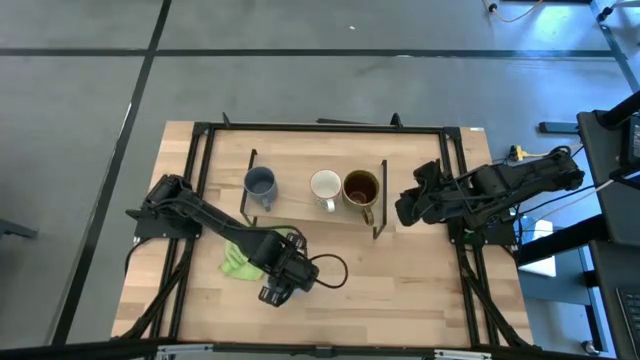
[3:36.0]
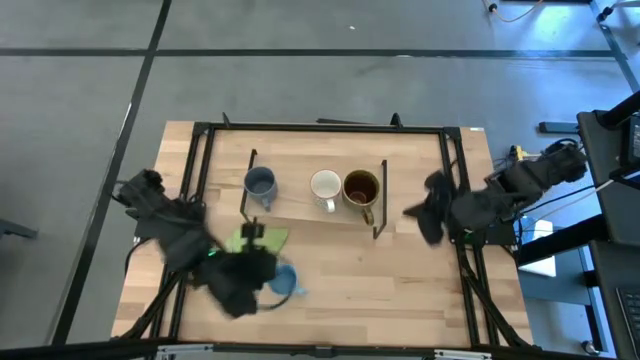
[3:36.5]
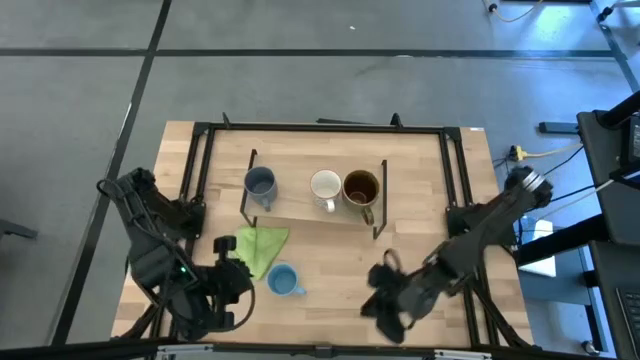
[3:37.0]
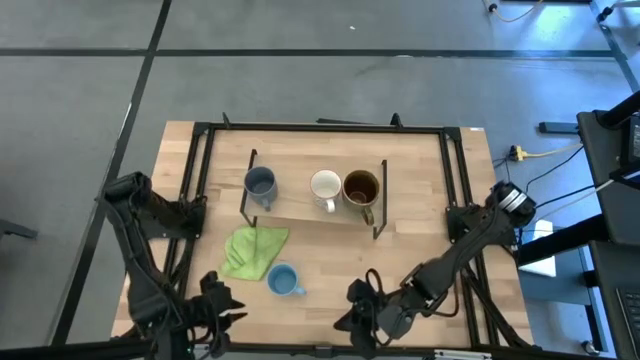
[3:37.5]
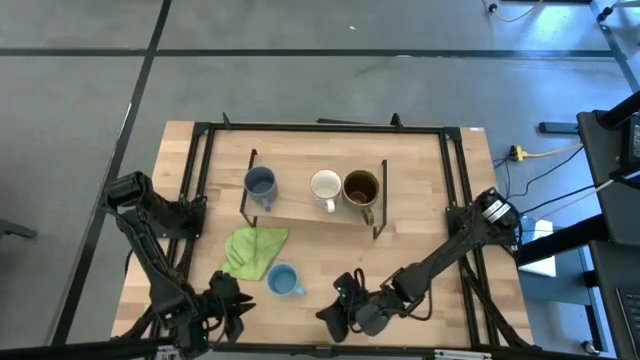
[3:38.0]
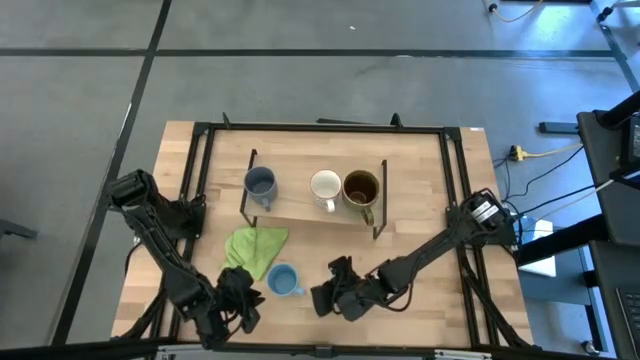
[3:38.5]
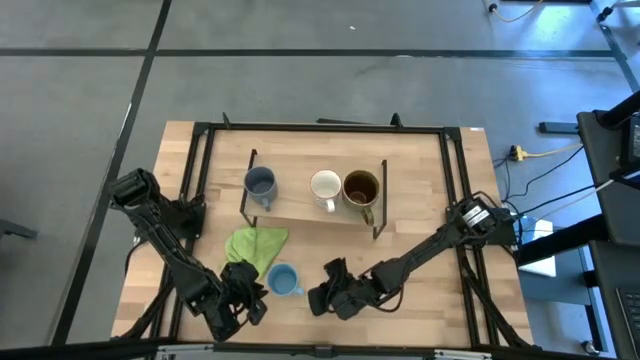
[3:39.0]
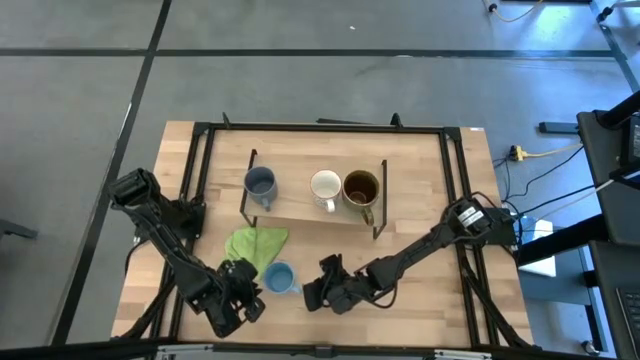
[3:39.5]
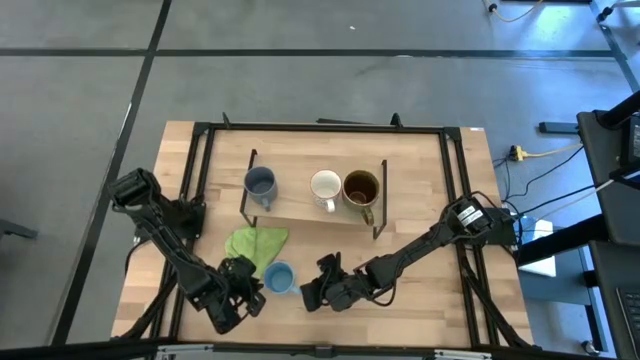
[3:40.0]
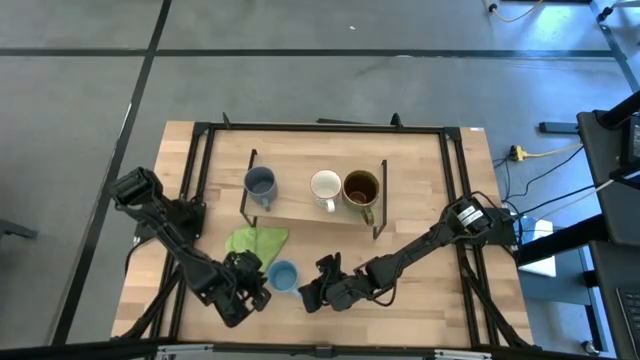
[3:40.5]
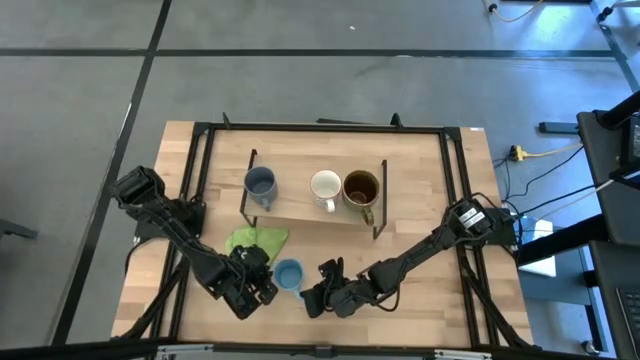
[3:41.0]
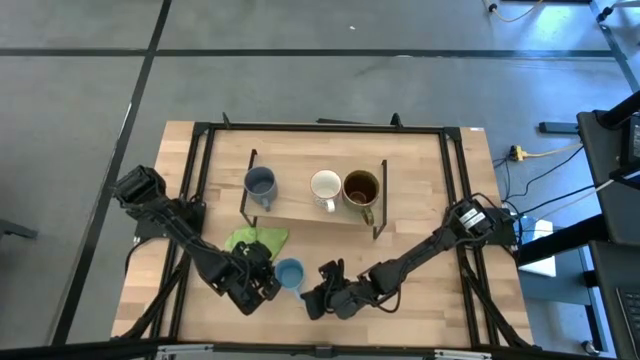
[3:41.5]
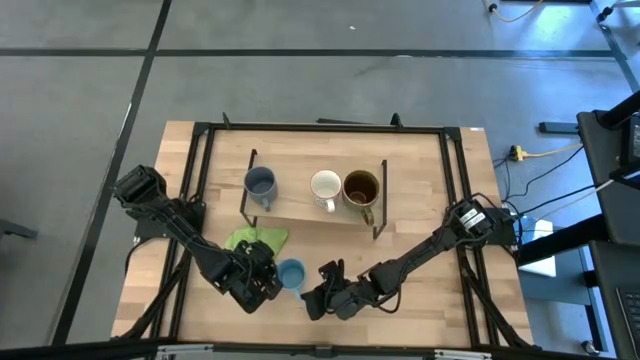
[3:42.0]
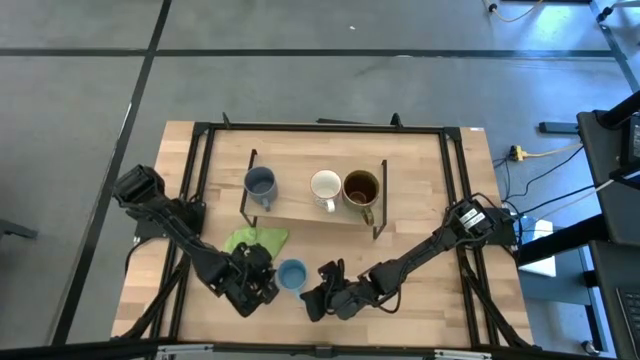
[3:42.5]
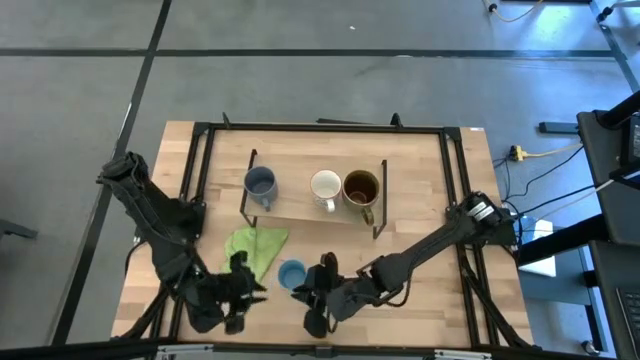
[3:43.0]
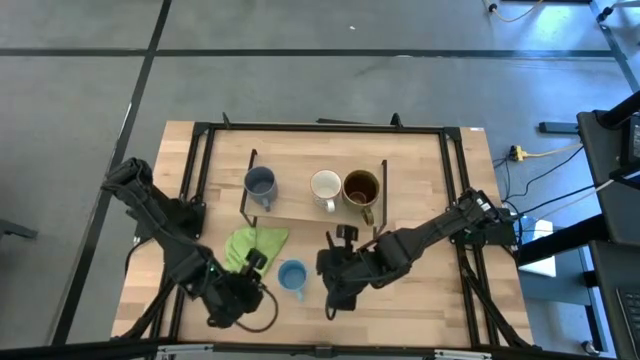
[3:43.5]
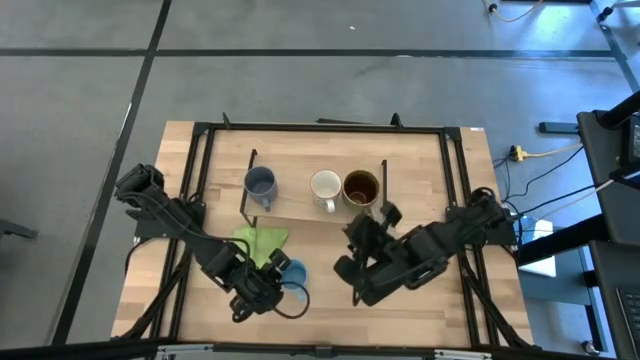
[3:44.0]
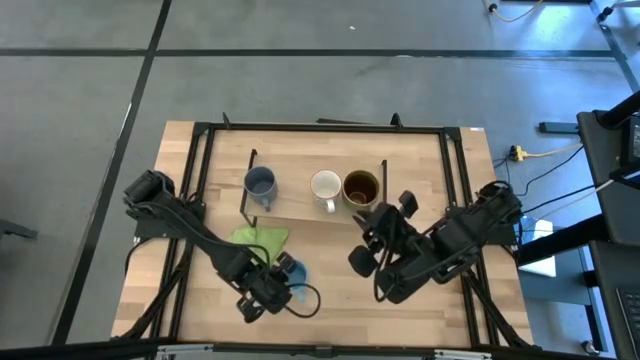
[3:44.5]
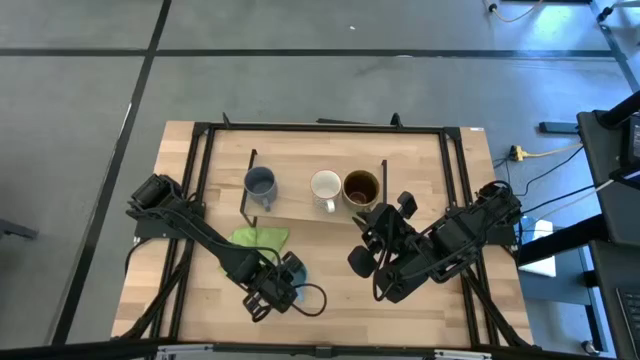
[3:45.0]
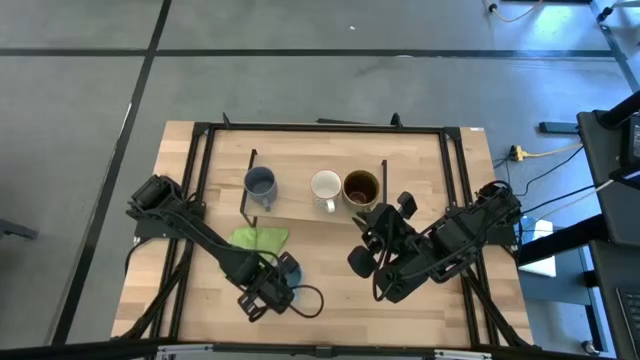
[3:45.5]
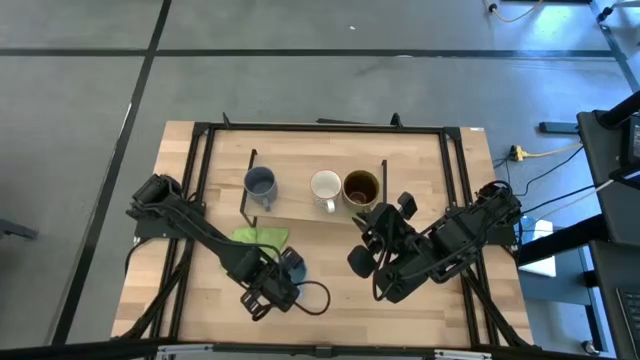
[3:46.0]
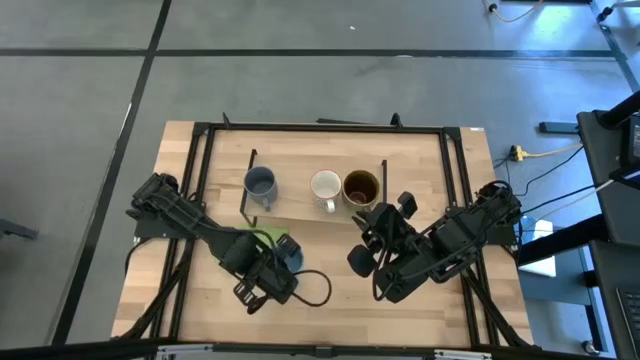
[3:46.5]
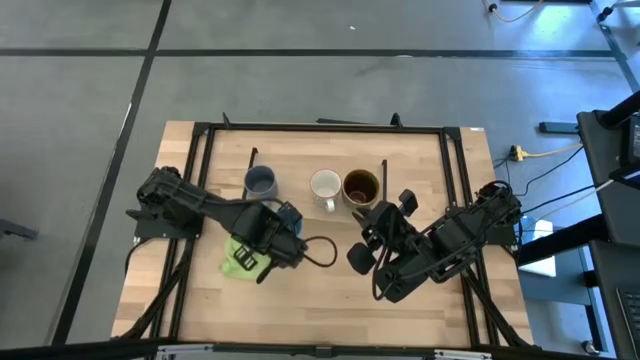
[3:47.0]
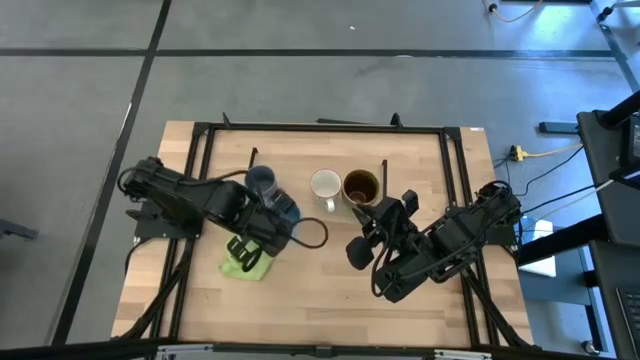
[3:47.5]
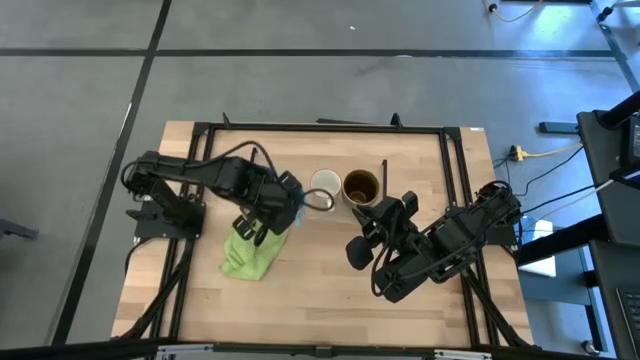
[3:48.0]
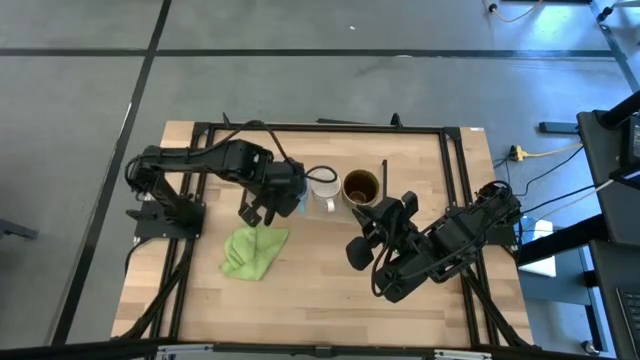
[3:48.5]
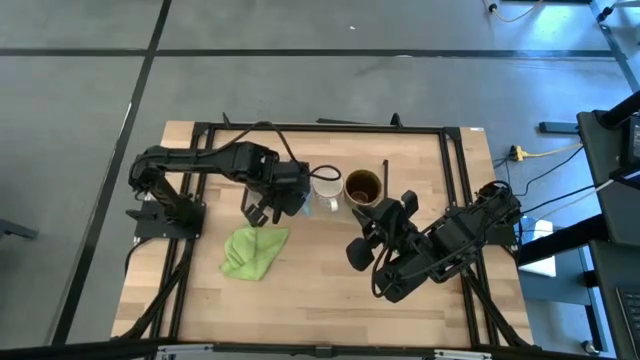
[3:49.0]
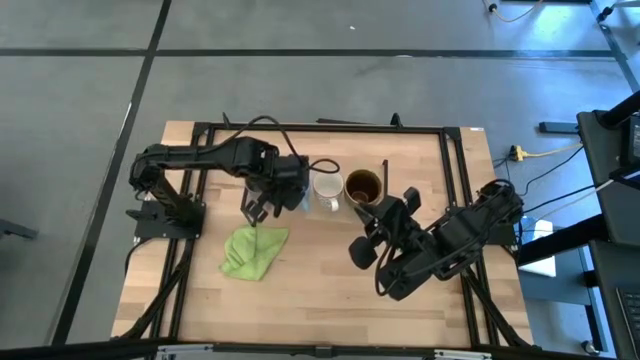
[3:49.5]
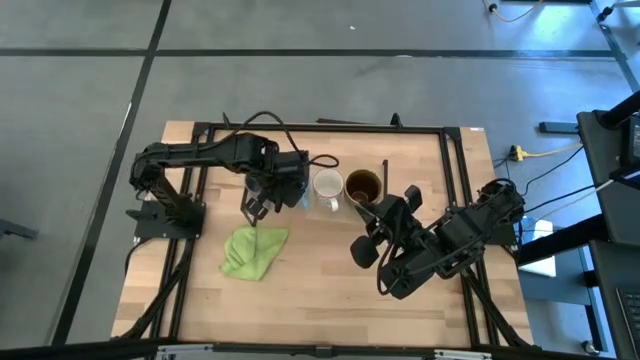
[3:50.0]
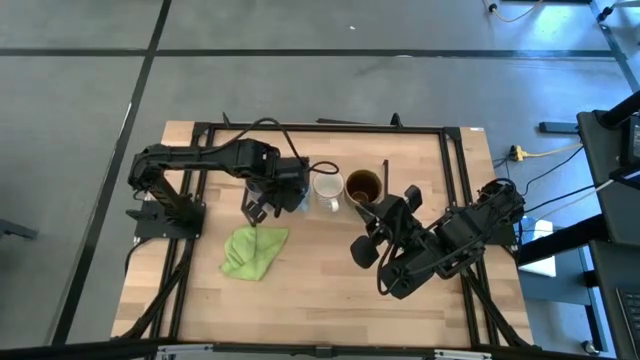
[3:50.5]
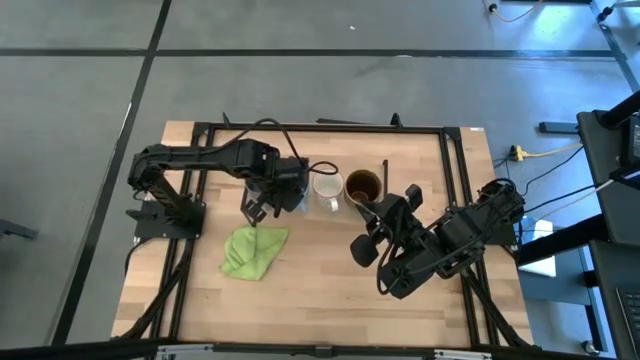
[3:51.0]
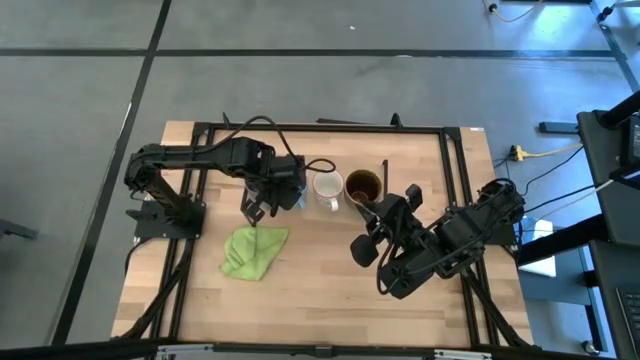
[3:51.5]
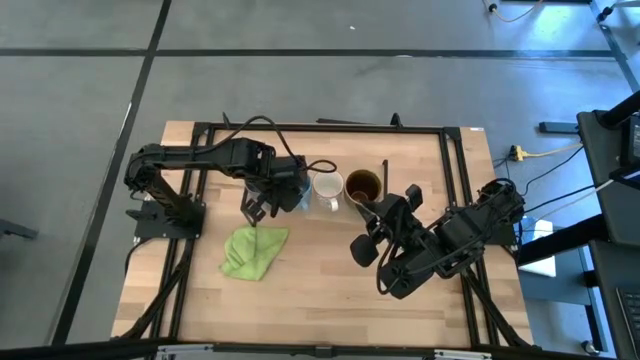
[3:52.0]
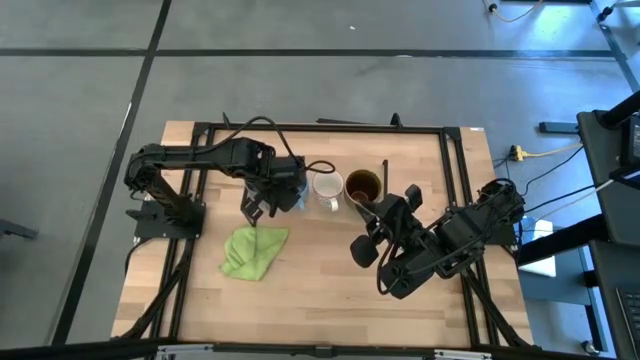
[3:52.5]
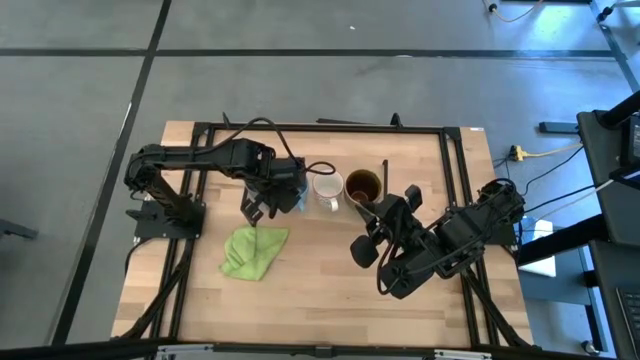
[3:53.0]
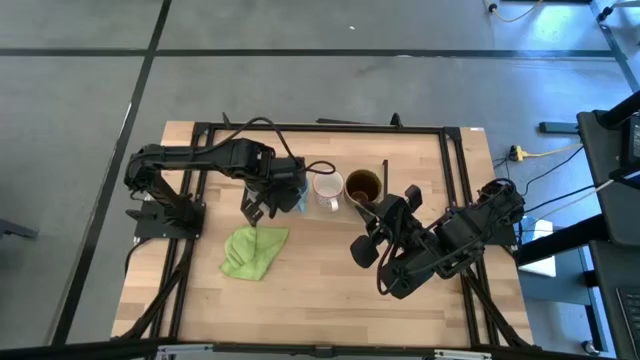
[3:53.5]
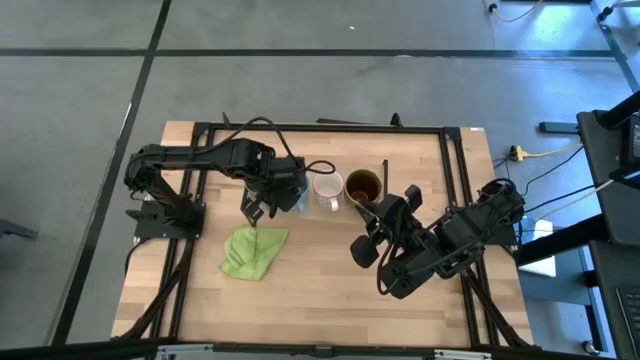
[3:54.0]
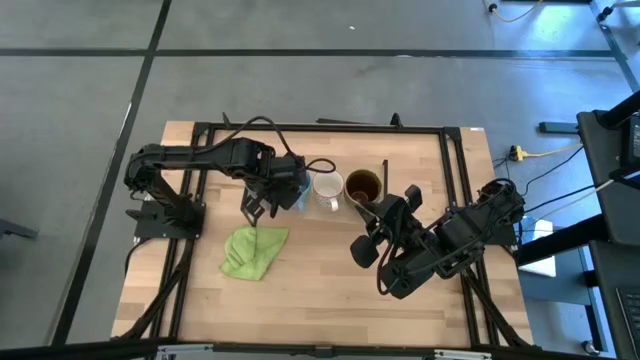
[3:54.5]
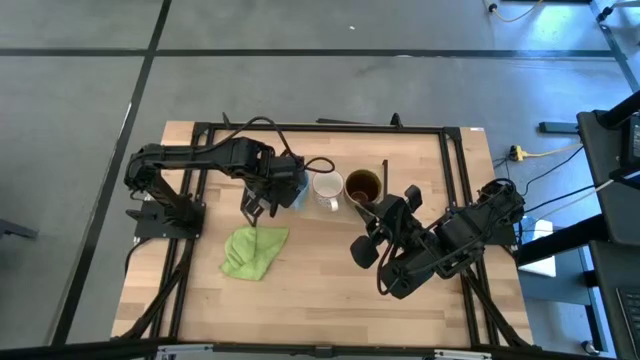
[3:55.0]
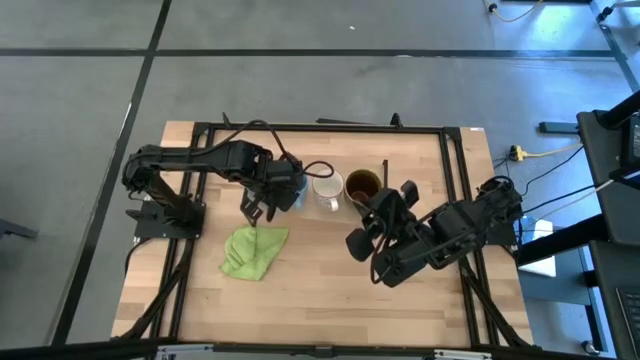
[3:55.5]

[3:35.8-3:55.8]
Task: Stack small to large cups/mugs on shelf
Put the blue mug on the shelf
